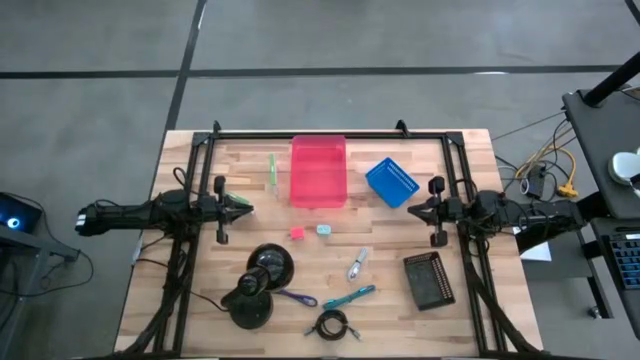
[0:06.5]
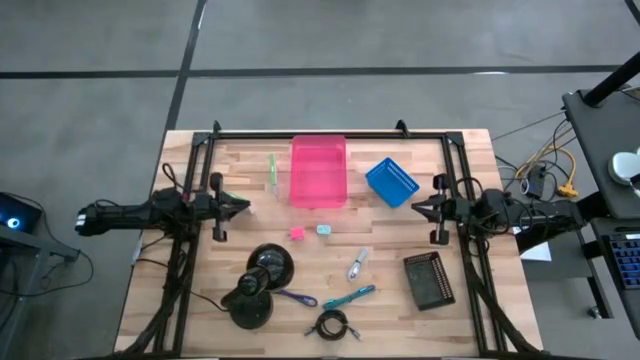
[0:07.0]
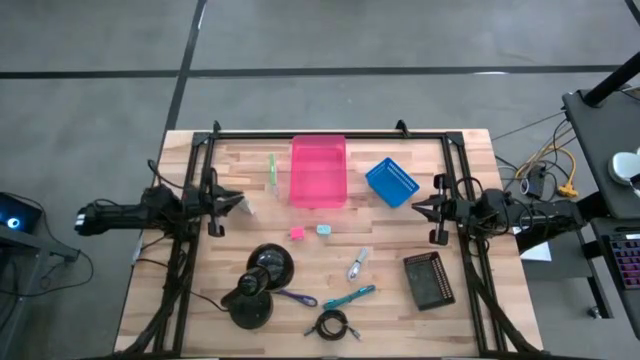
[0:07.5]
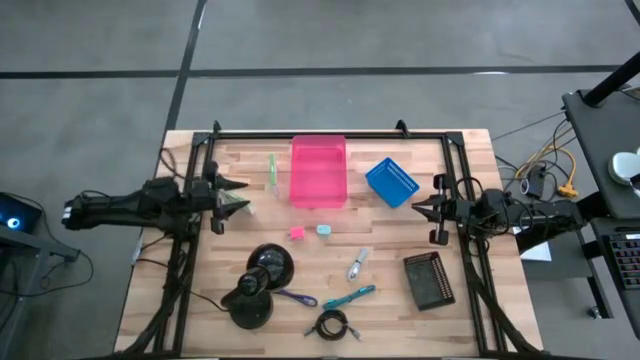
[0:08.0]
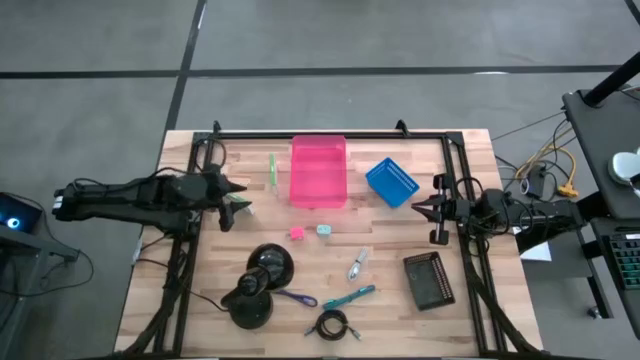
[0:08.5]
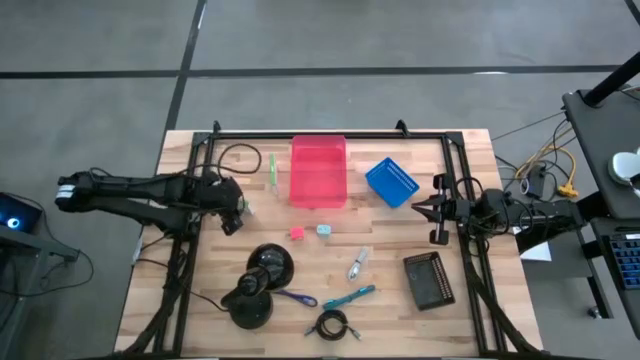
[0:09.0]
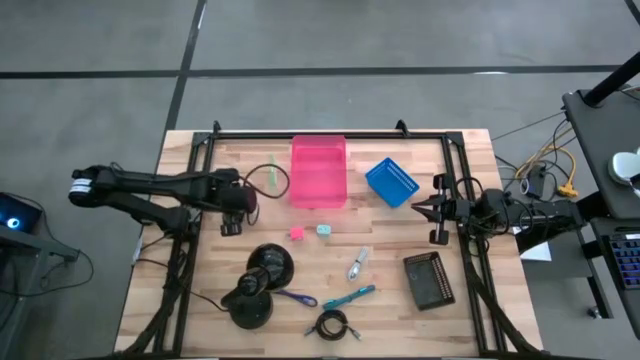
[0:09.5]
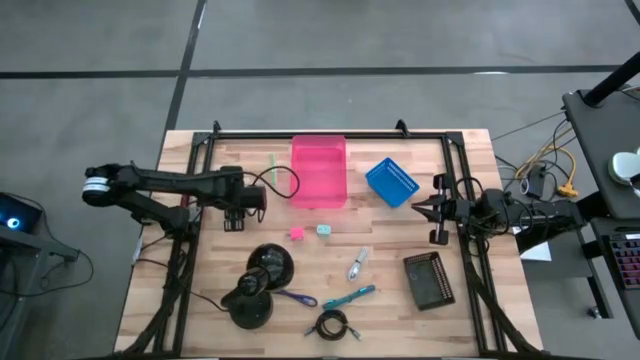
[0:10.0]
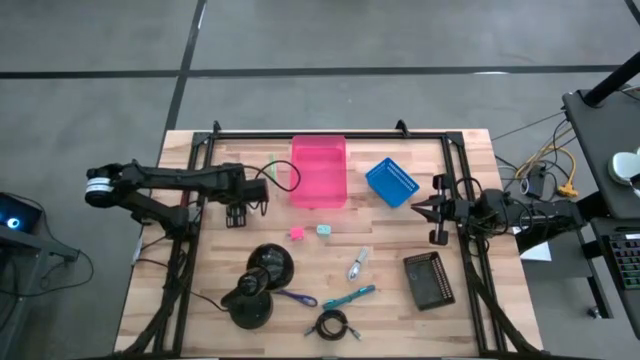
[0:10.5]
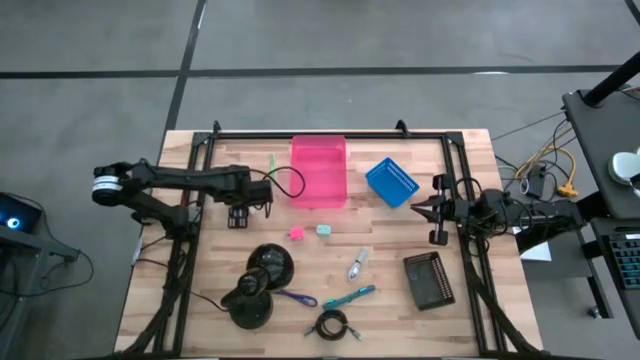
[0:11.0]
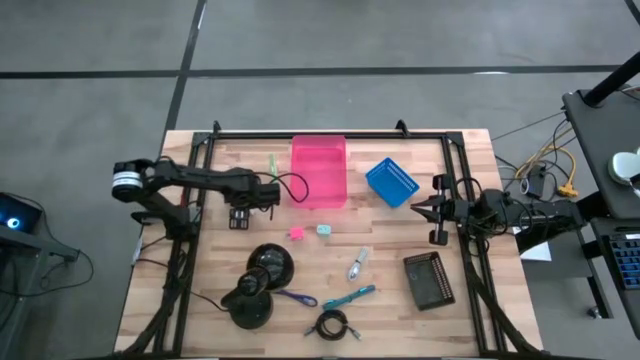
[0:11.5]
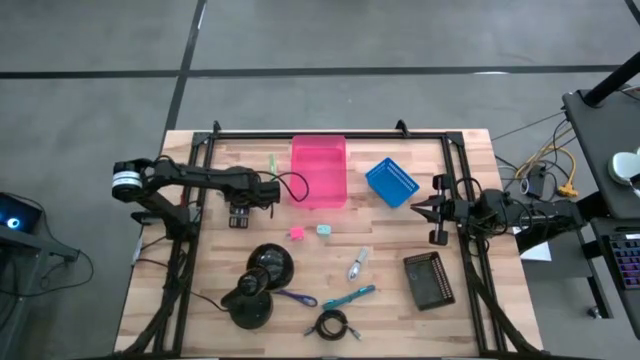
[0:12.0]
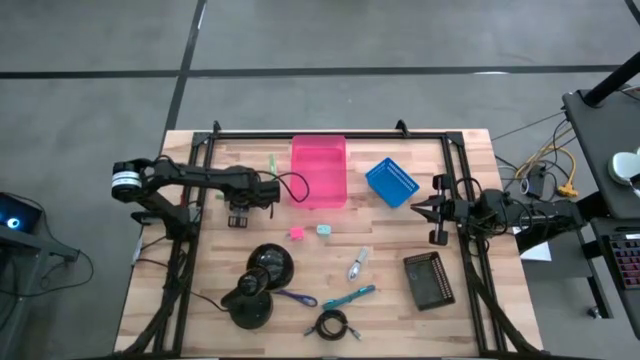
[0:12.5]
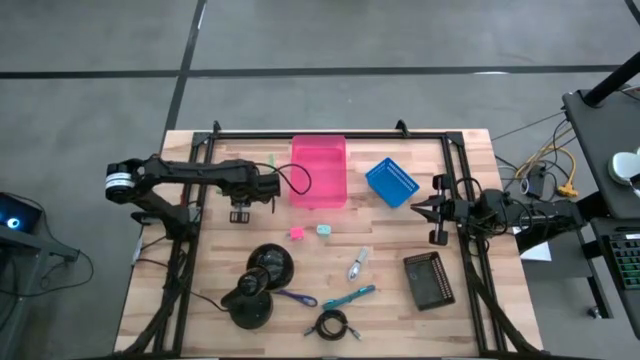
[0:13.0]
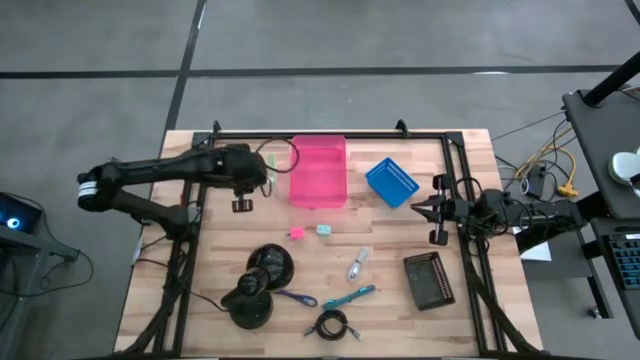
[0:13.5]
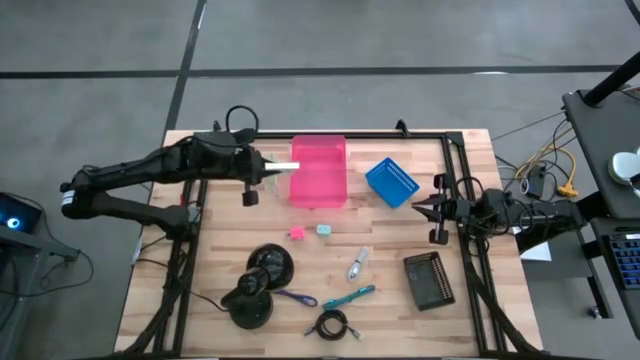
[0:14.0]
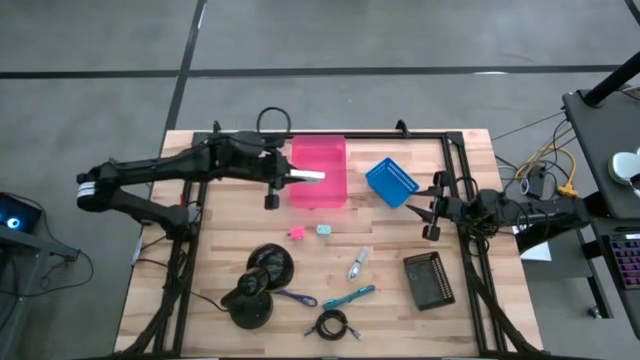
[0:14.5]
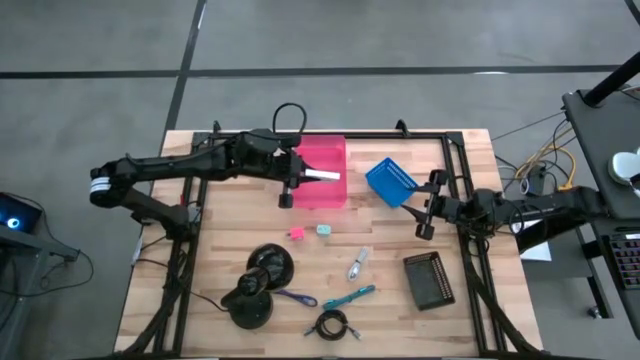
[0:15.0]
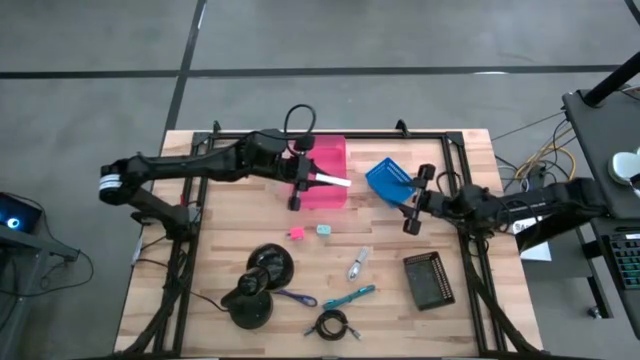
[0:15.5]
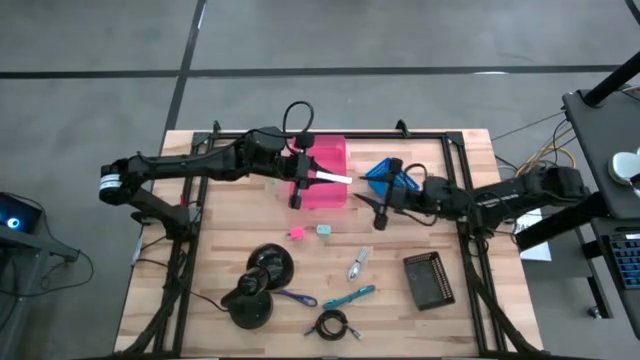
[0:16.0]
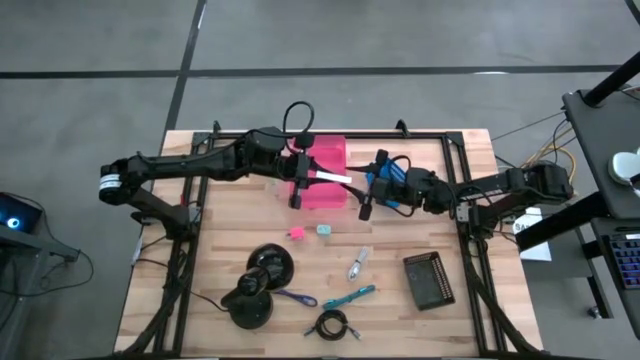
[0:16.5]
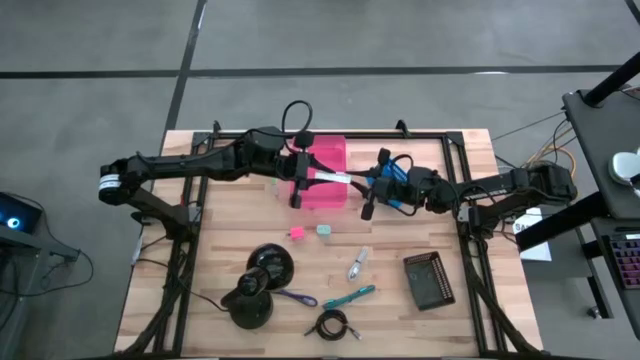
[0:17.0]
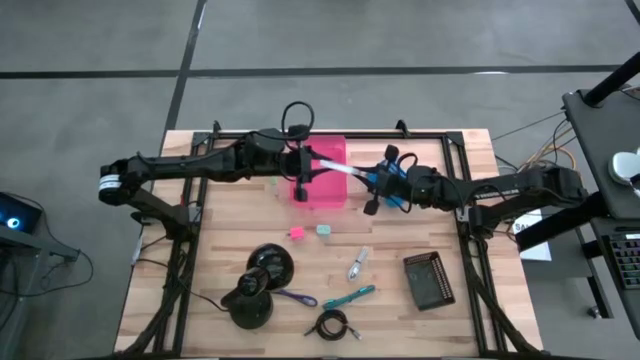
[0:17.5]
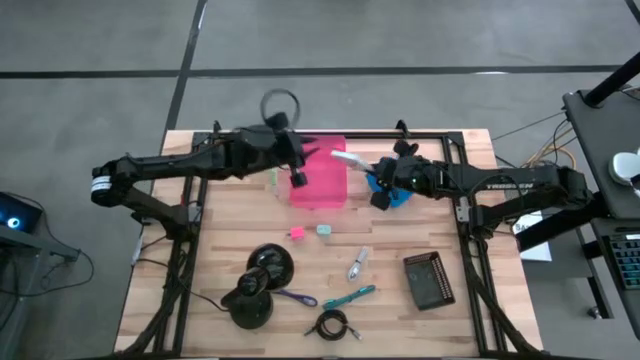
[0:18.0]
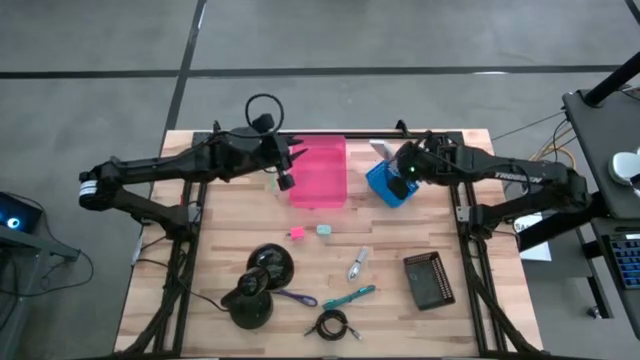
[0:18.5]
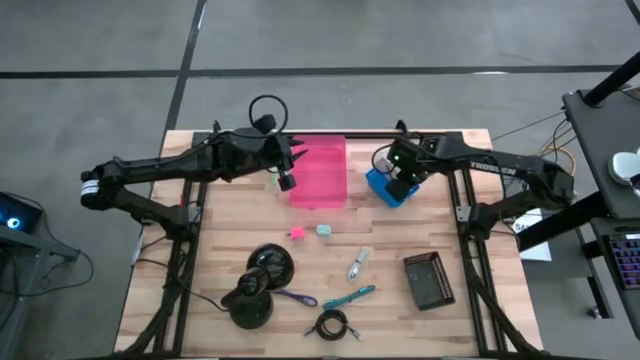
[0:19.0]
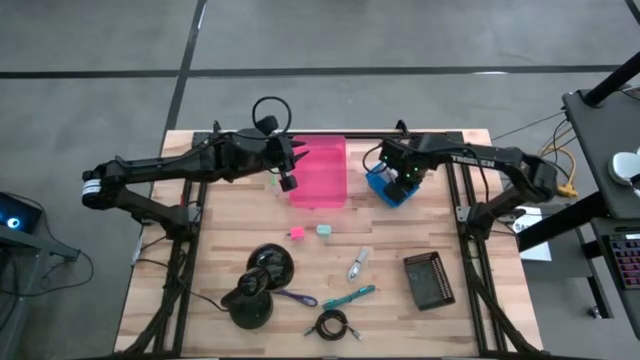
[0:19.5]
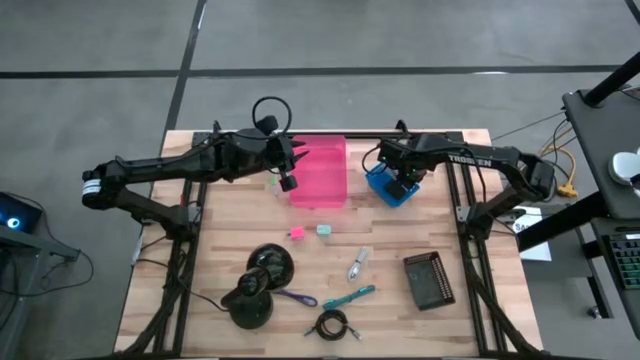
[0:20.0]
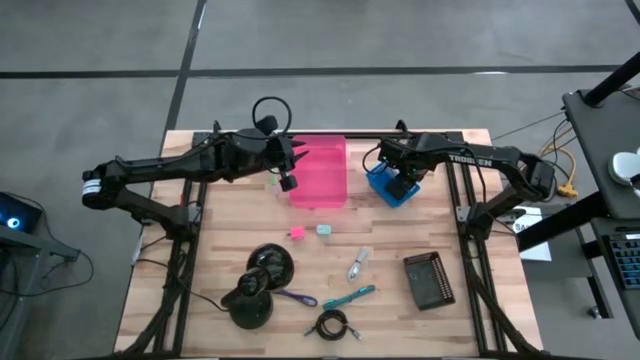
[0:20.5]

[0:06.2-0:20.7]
Task: Pick and place items into bin
Put the bottom card reader box into the blue bin
